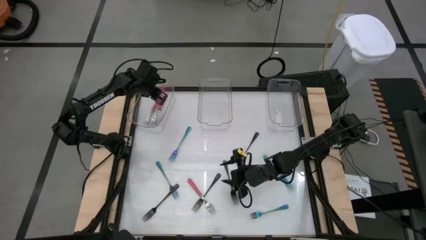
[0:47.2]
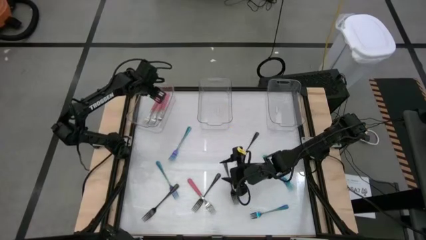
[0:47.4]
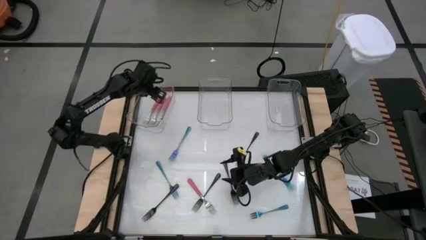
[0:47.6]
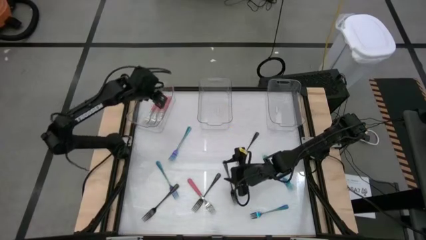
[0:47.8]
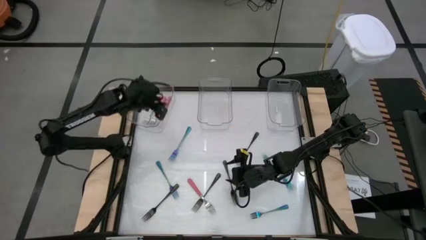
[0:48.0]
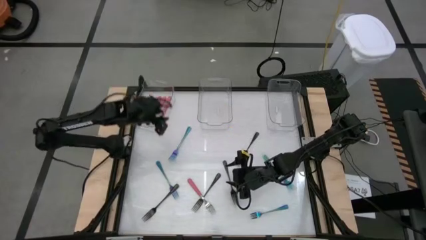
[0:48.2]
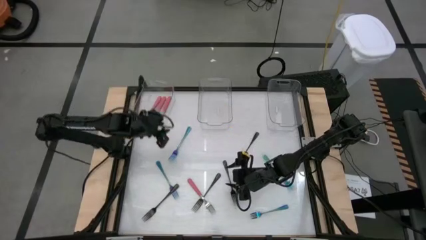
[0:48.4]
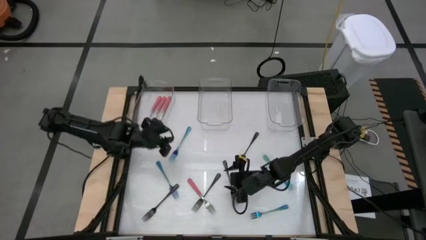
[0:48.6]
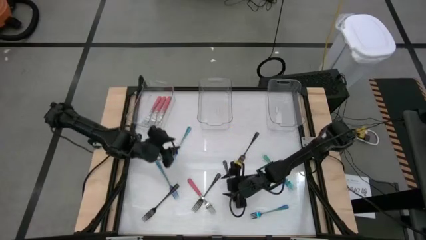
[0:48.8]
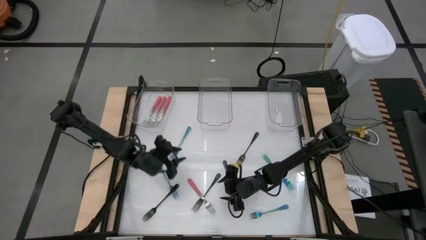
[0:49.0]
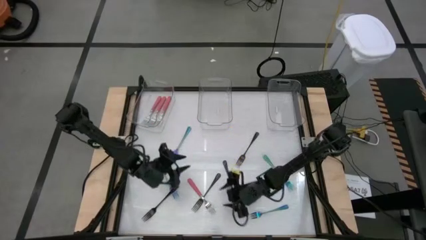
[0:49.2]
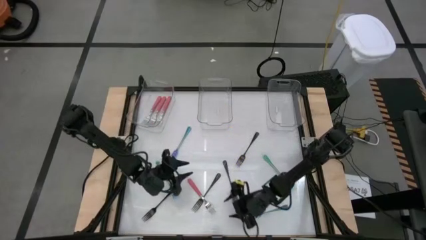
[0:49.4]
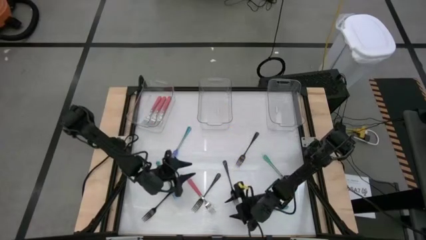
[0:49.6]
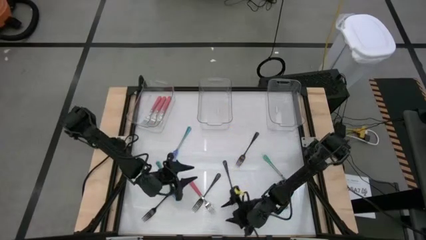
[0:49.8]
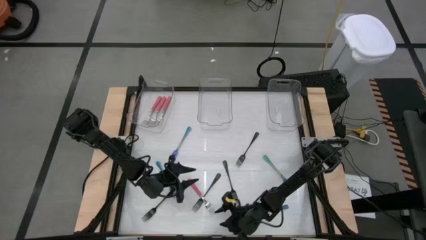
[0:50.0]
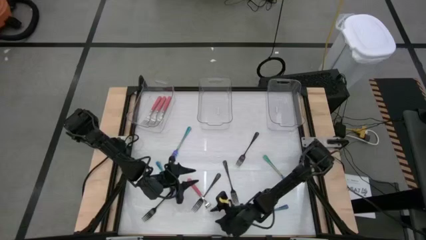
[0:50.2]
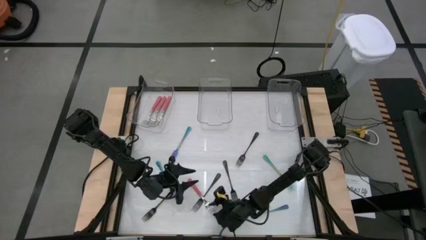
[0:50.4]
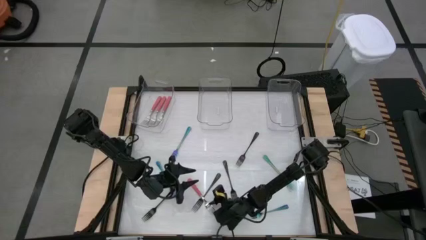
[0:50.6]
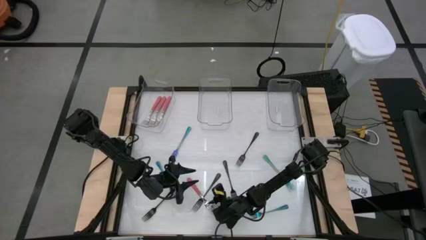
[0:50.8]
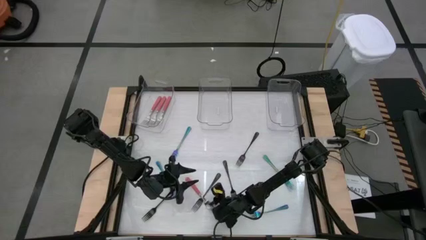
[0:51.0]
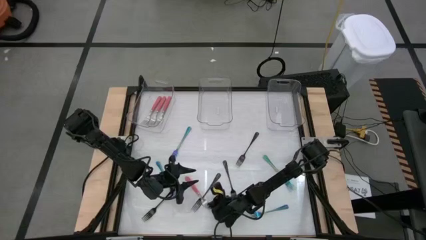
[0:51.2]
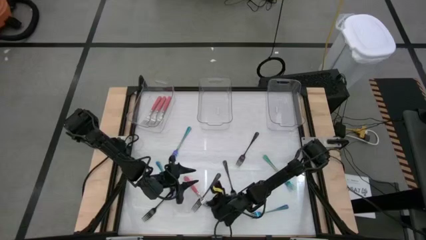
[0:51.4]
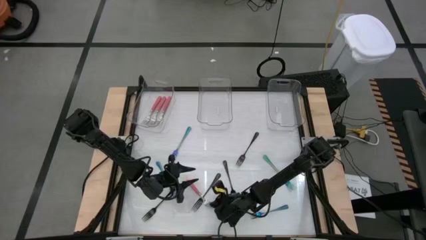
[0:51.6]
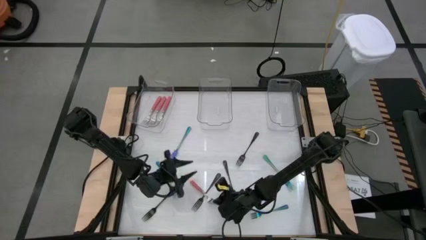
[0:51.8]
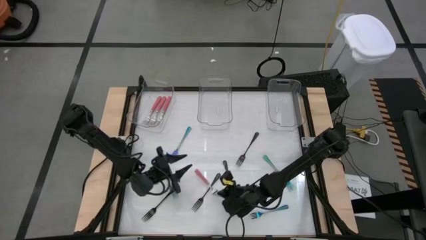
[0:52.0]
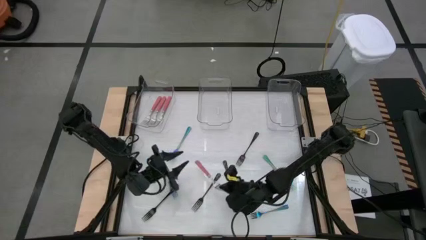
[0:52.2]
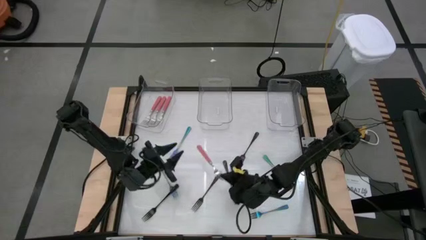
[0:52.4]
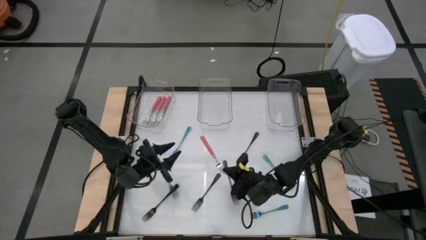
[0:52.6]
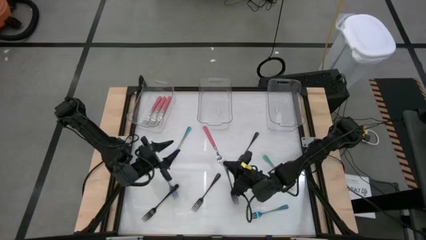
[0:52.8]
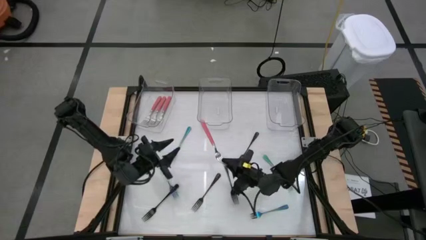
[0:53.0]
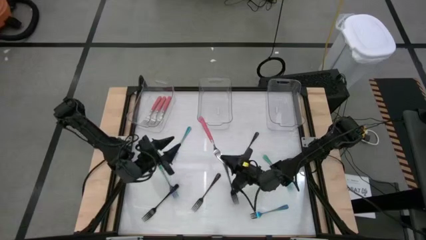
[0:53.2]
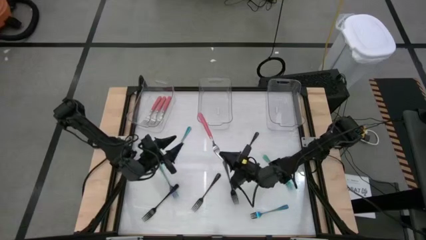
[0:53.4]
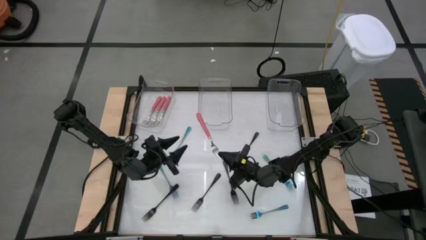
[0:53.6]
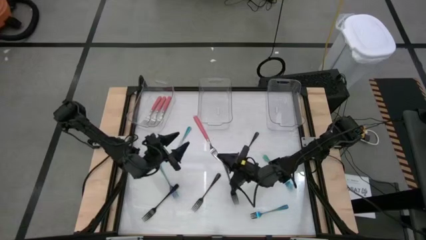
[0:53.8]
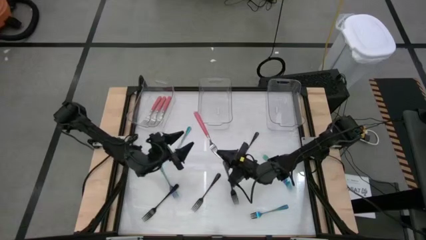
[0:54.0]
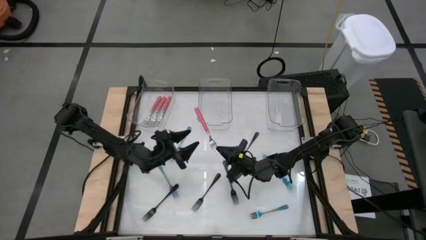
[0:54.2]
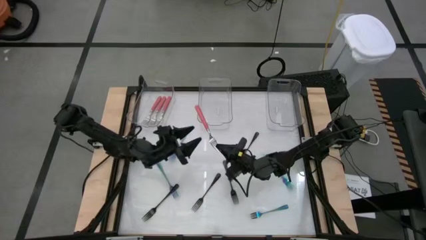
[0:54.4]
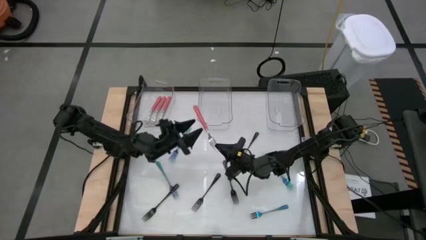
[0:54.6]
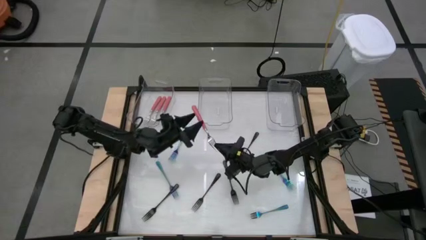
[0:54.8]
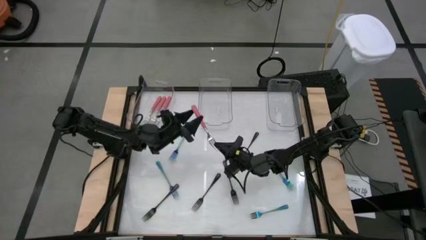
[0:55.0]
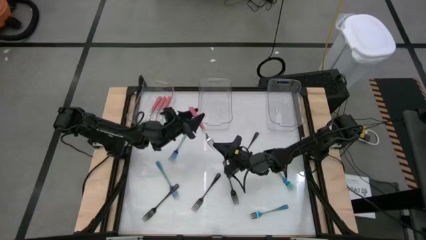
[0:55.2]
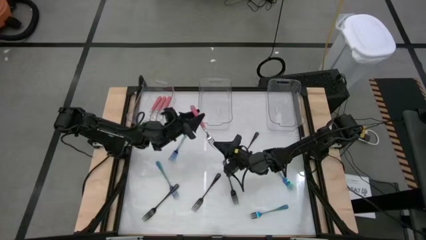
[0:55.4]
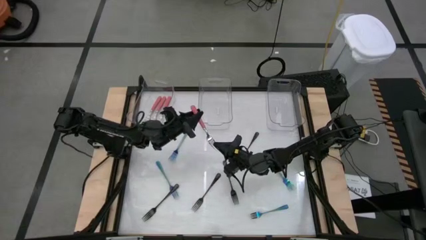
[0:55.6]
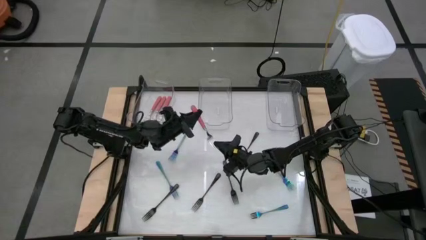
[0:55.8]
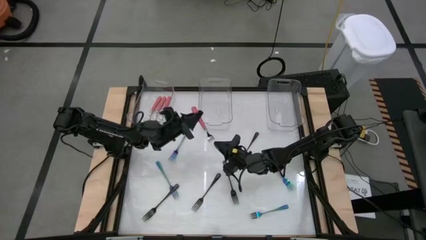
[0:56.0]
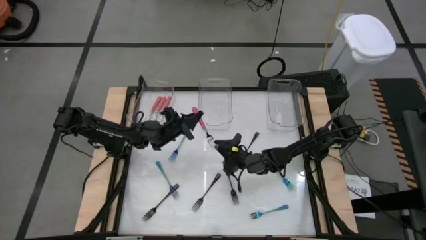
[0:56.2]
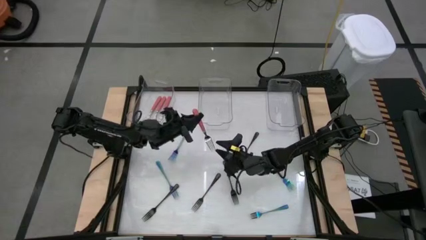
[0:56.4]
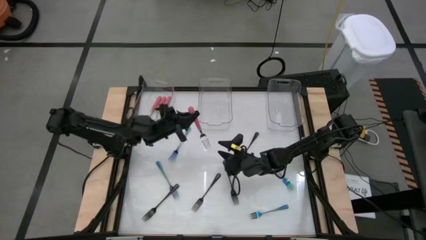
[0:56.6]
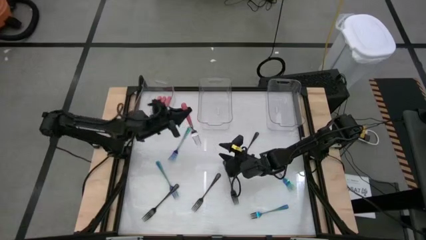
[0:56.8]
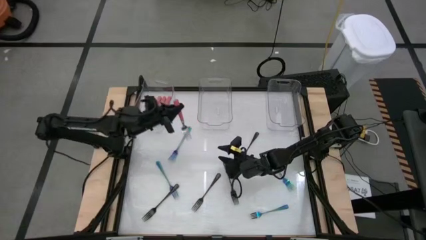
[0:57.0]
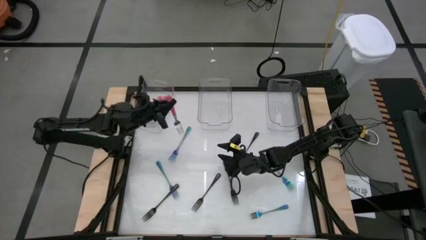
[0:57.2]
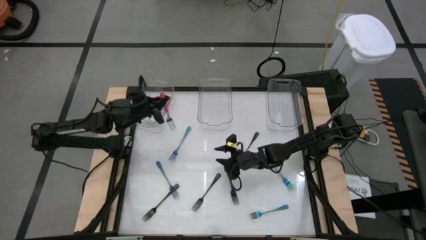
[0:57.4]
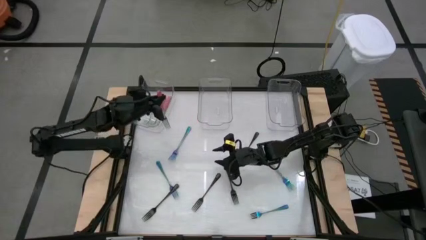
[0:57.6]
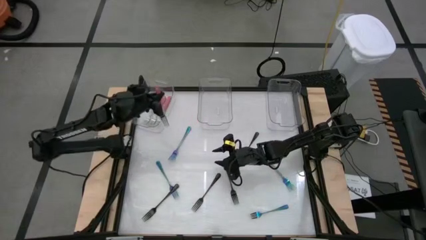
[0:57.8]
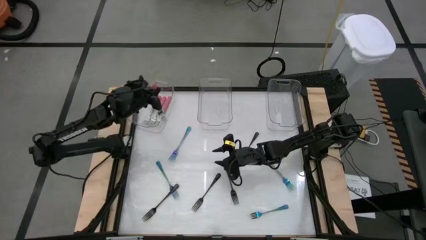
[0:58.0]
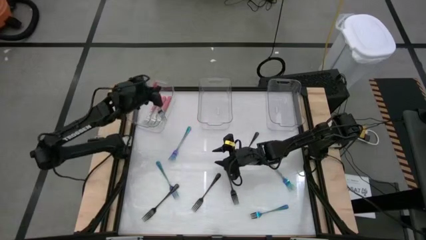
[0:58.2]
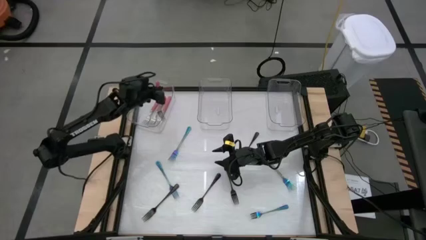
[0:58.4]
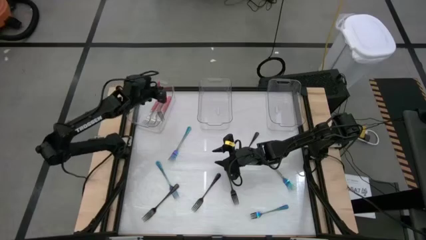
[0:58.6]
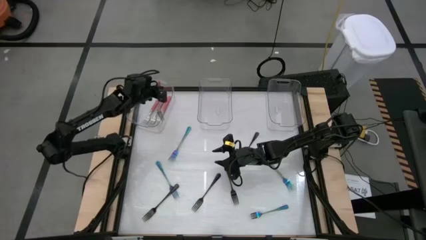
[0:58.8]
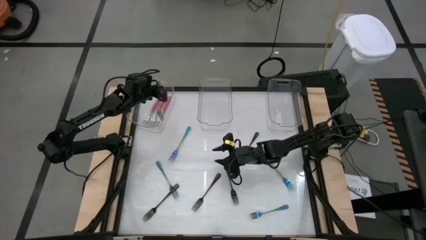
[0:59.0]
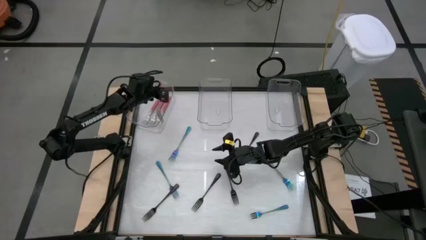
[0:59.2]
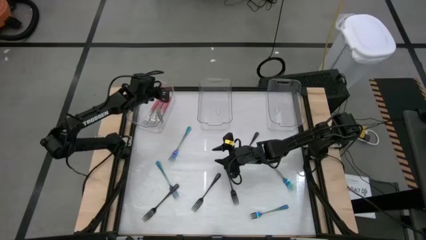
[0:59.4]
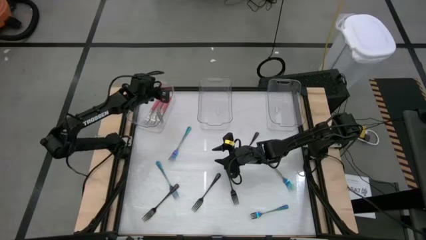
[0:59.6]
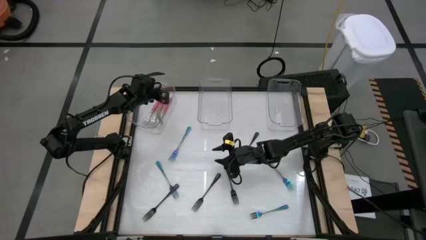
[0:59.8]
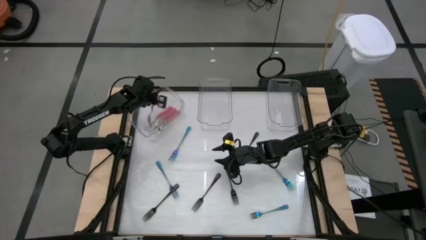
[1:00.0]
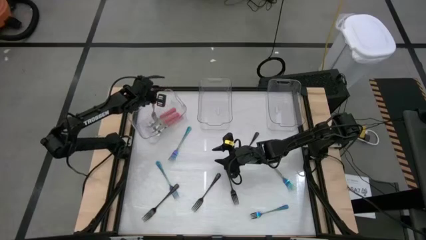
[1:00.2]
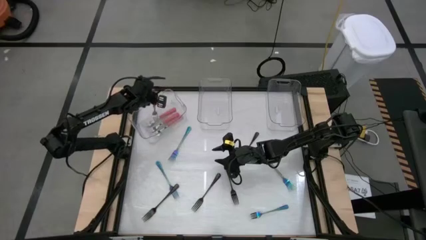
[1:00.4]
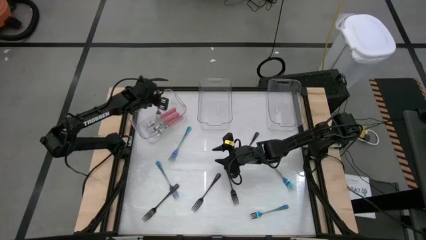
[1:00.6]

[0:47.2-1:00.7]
Task: Sort silverware by color (type)
Put the pink fork into the left transparent bin
